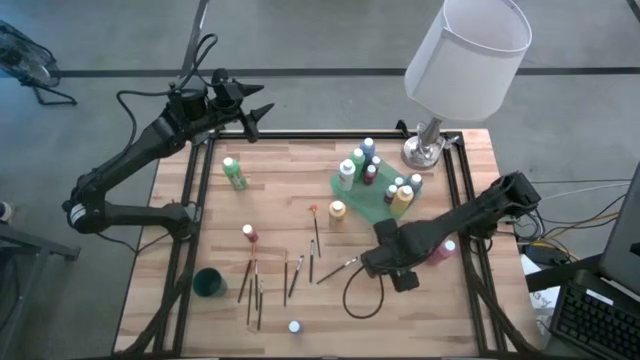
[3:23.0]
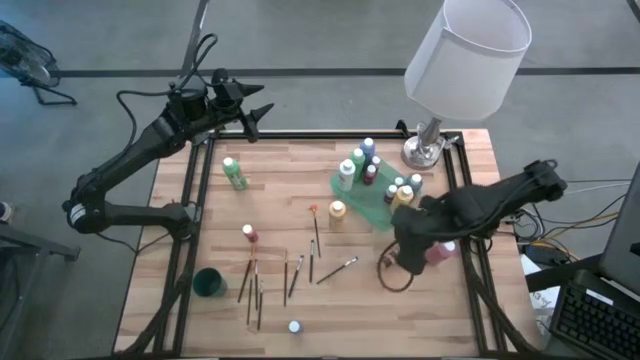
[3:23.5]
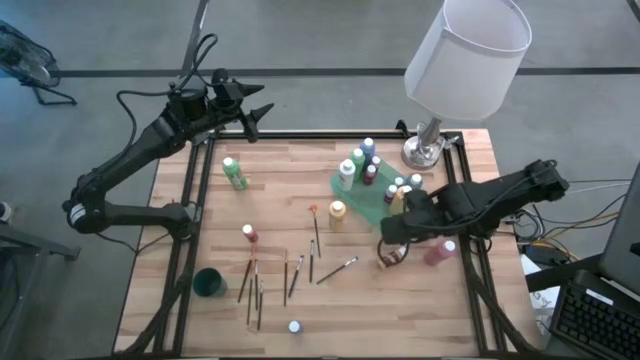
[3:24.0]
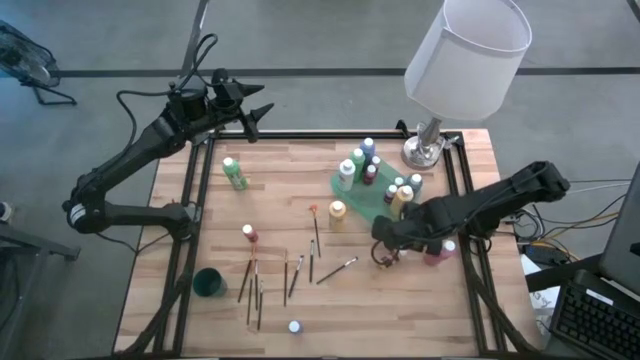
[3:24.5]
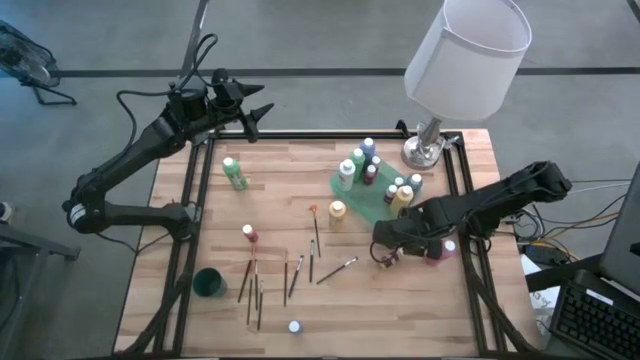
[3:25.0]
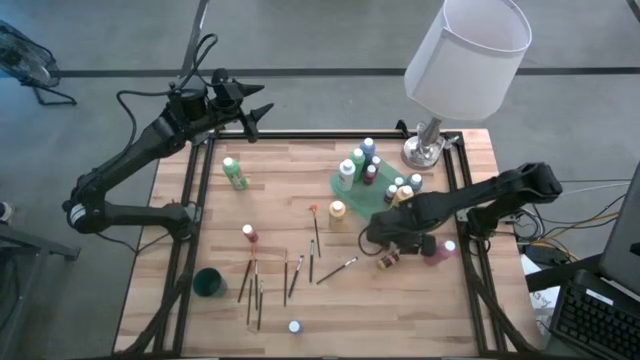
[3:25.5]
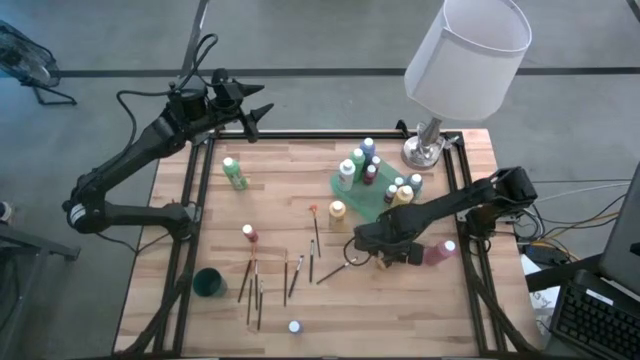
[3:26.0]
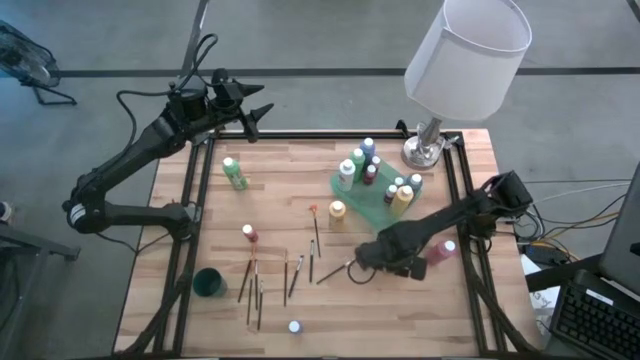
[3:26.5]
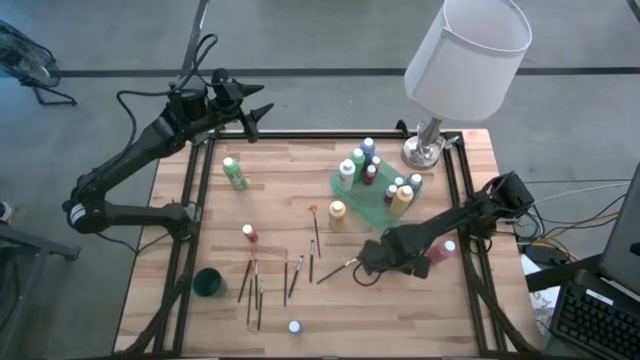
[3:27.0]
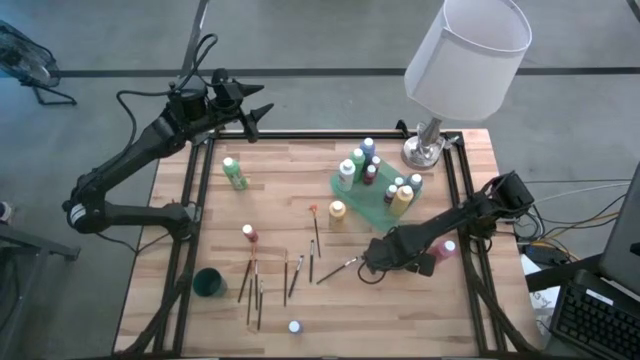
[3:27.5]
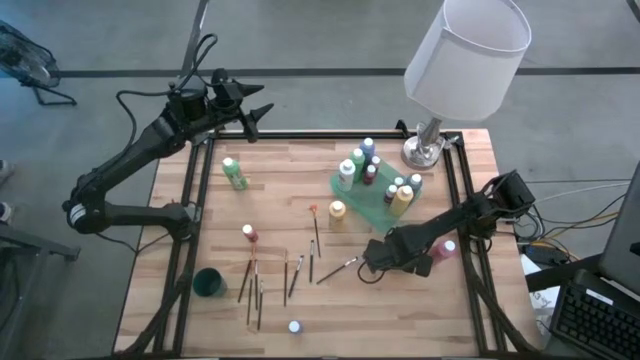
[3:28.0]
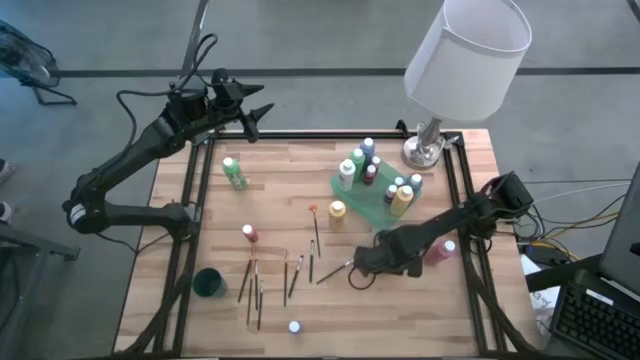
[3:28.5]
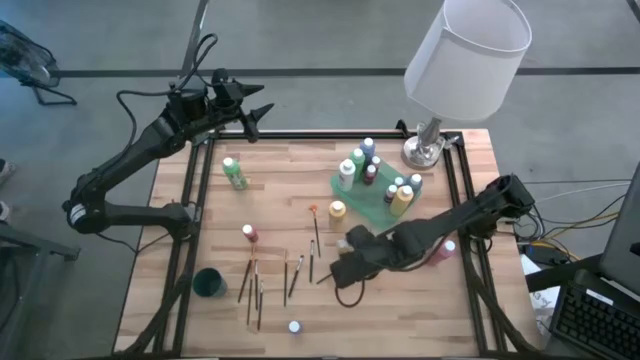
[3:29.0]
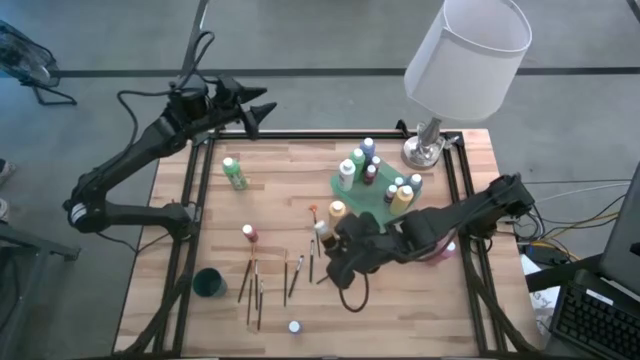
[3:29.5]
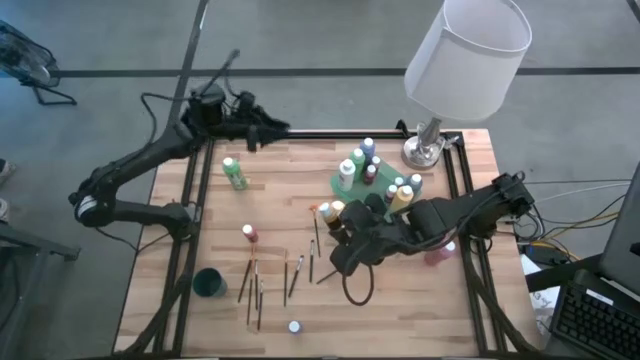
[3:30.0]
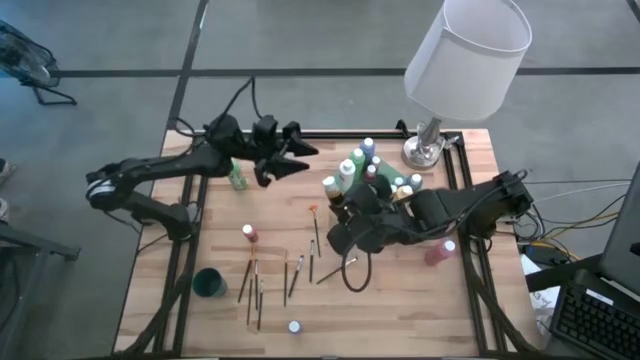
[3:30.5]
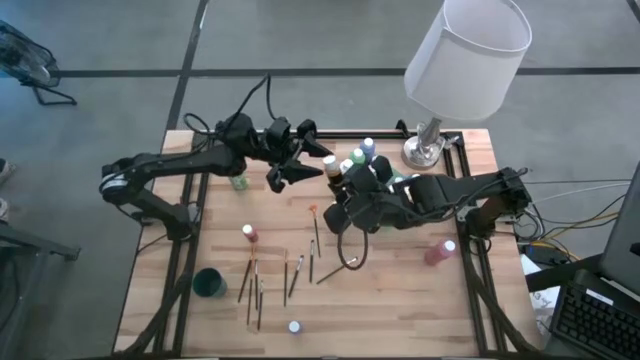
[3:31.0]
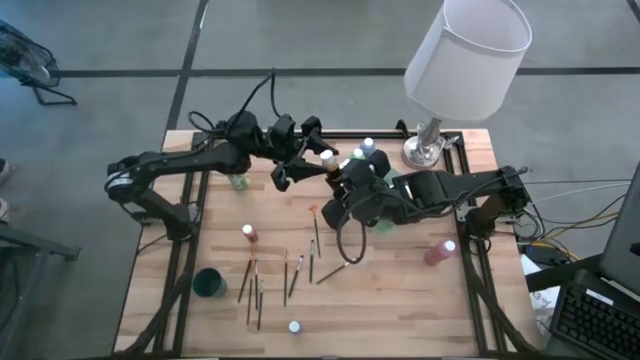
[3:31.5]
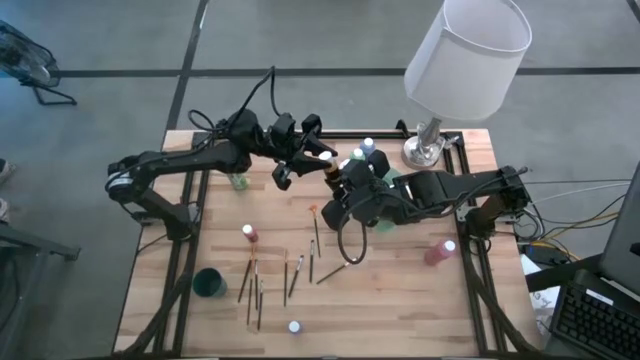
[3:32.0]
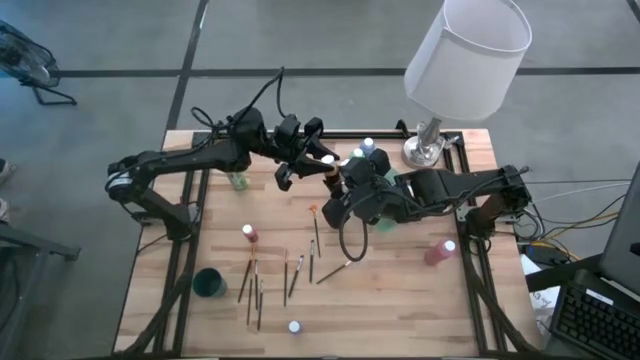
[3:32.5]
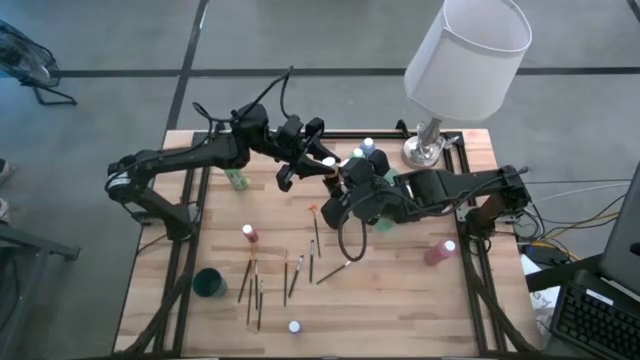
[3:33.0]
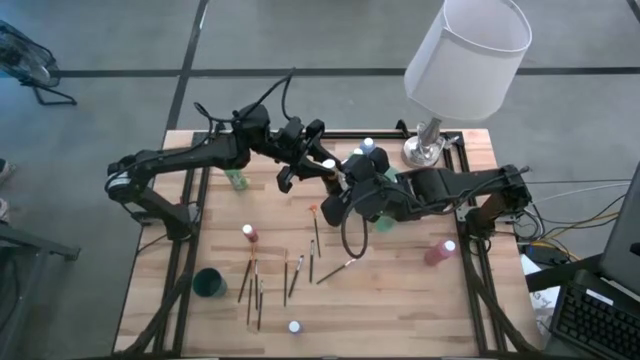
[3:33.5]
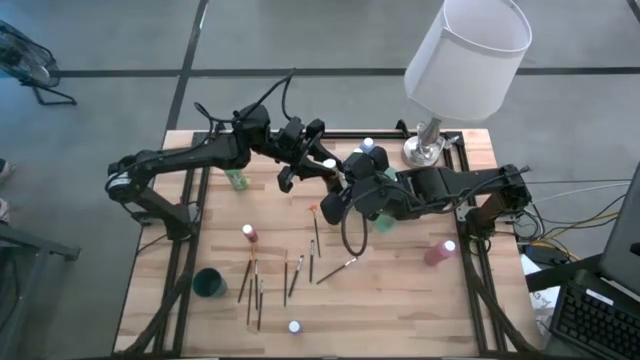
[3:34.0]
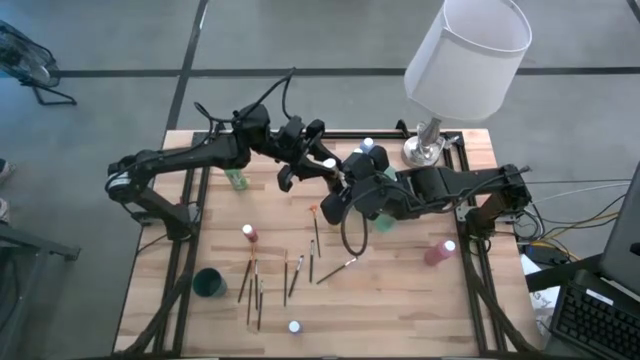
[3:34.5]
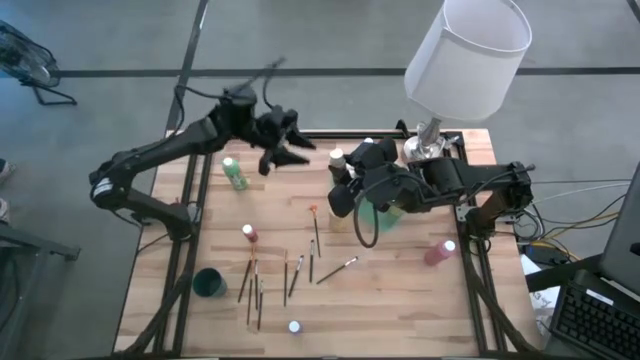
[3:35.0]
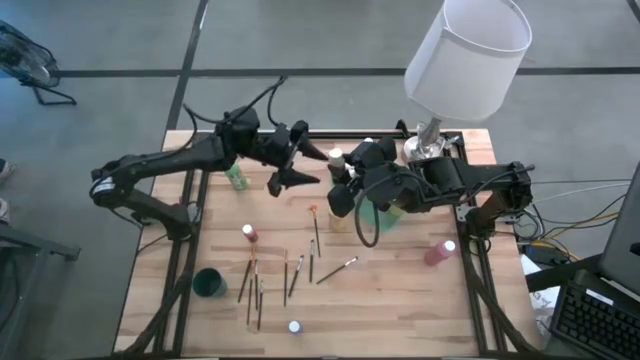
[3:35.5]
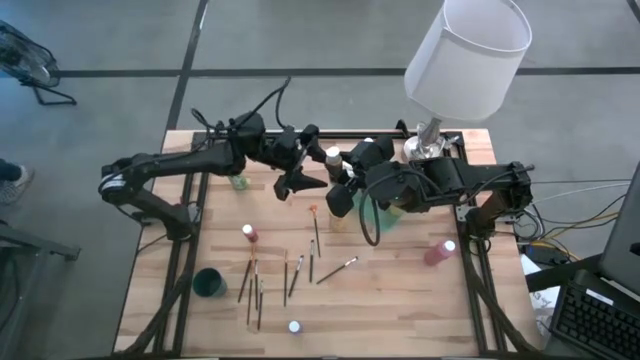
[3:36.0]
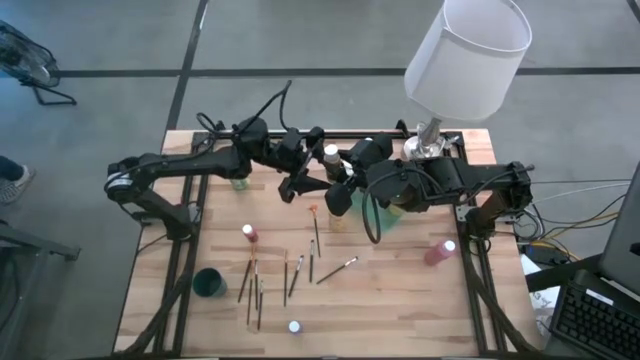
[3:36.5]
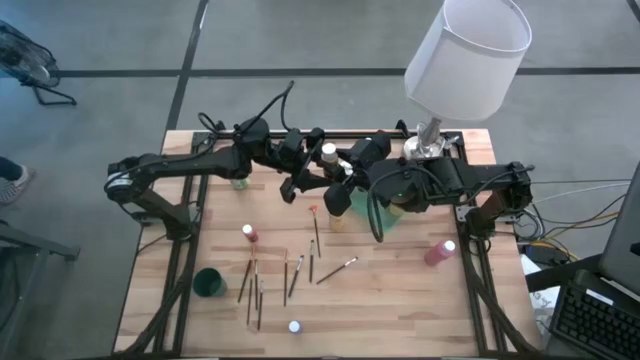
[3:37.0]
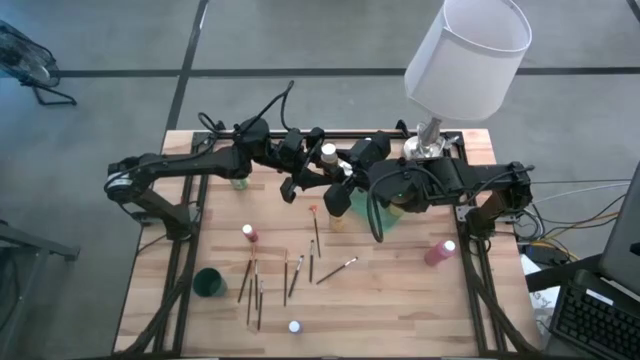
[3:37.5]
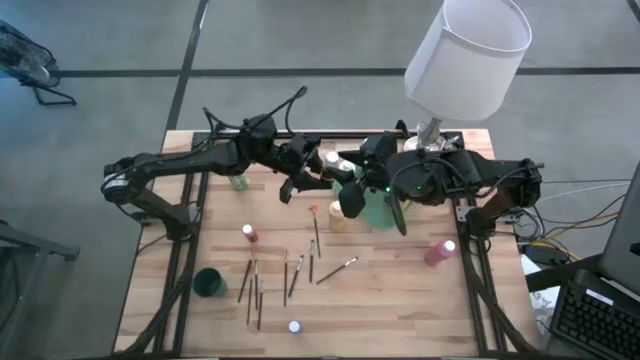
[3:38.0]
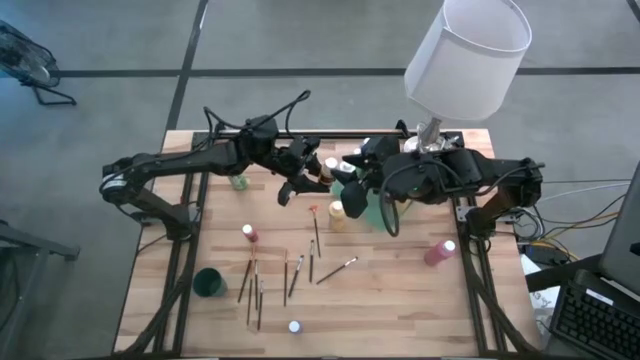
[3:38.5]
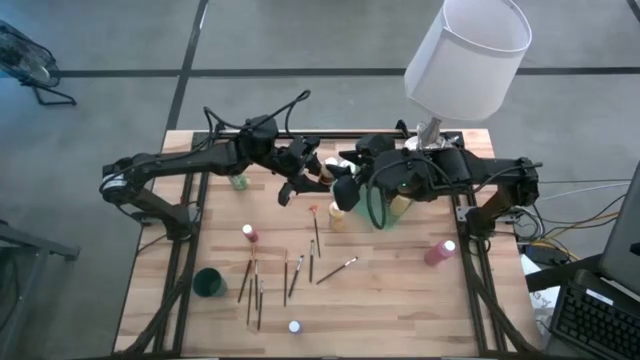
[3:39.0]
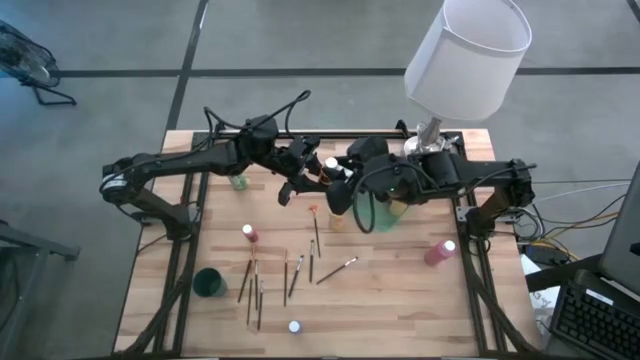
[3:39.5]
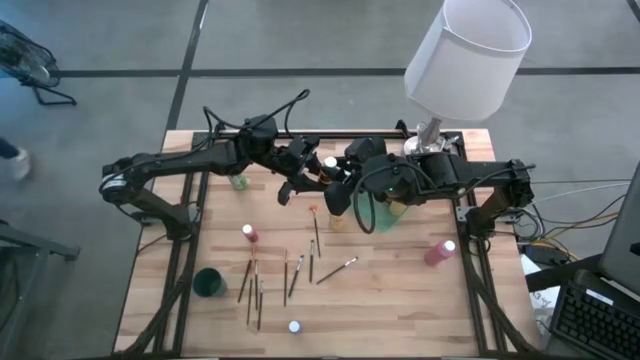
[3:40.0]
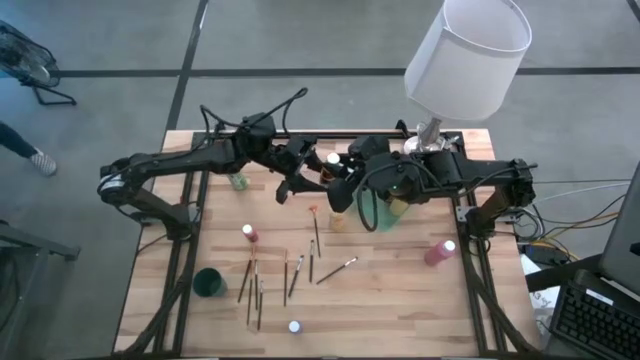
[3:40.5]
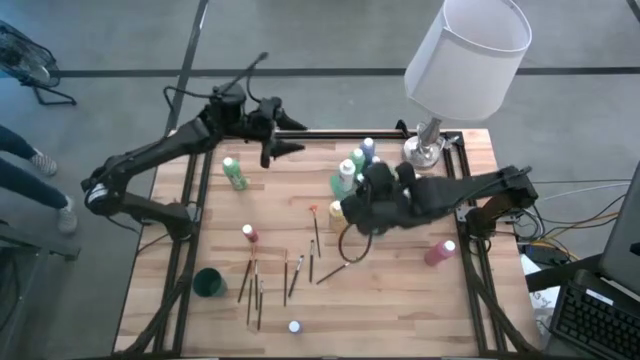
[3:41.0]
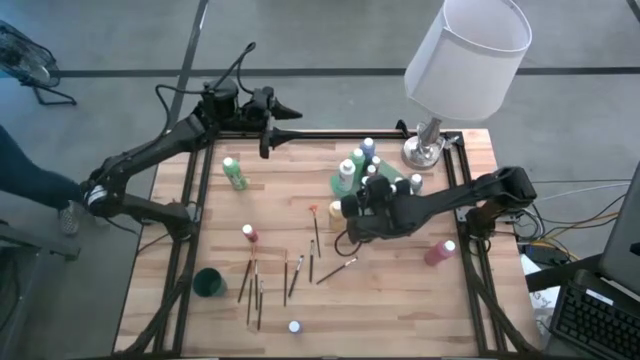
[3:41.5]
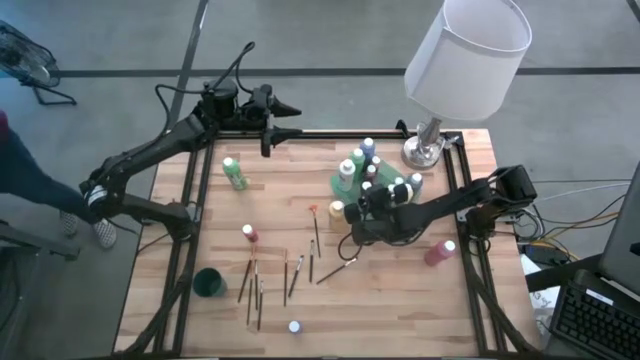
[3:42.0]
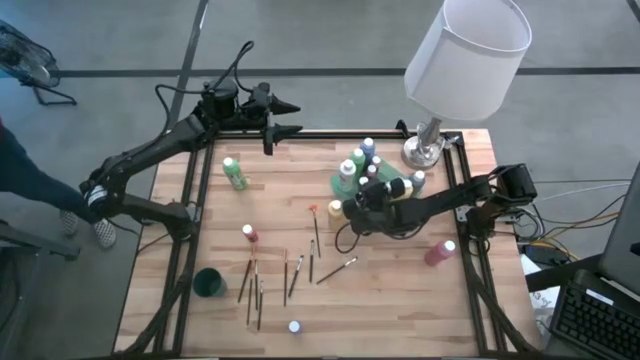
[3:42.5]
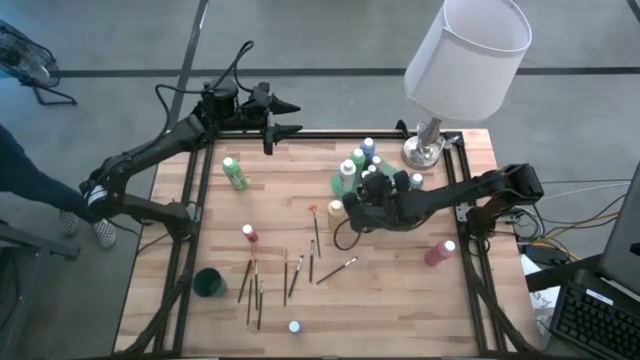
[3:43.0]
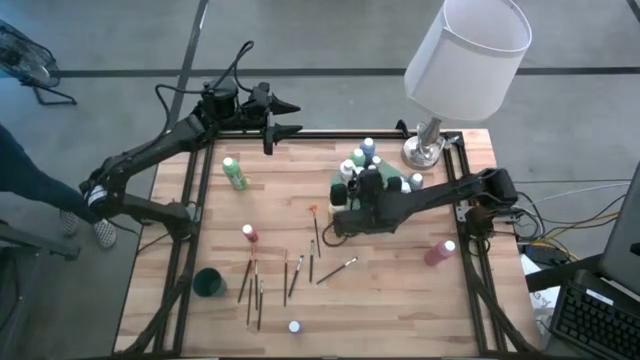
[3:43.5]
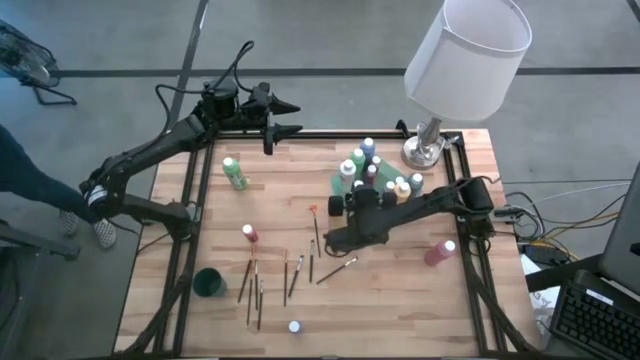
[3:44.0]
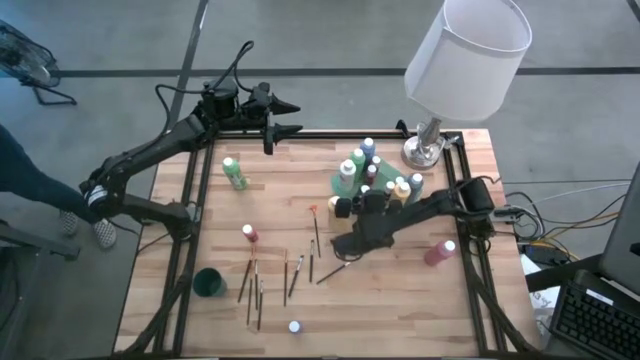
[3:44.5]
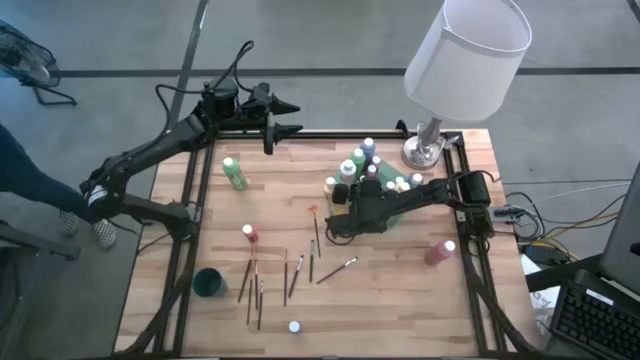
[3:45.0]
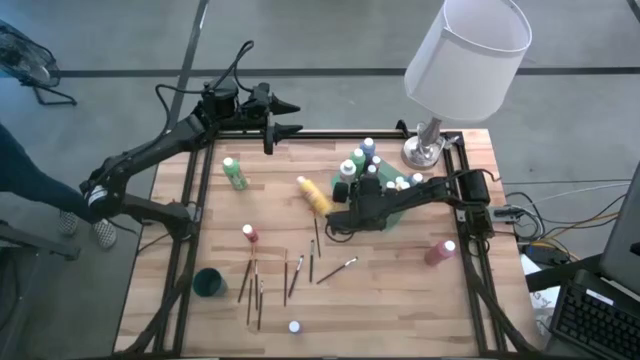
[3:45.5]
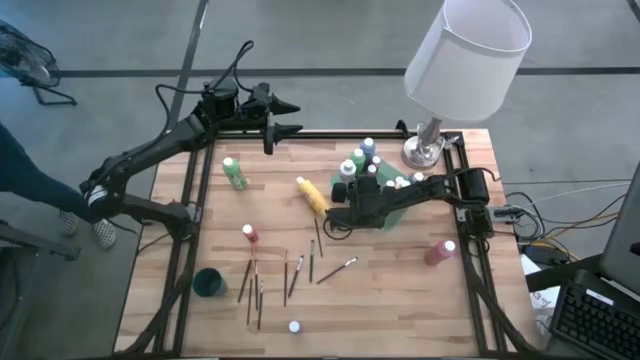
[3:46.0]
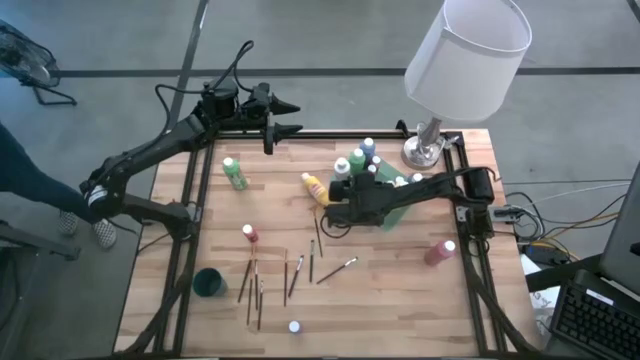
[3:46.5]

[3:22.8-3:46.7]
Task: Pick & Place Paint Supplies
Put the small yellow paint bottle into the green bin
